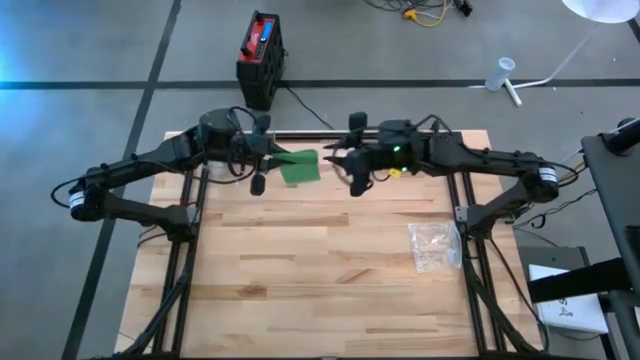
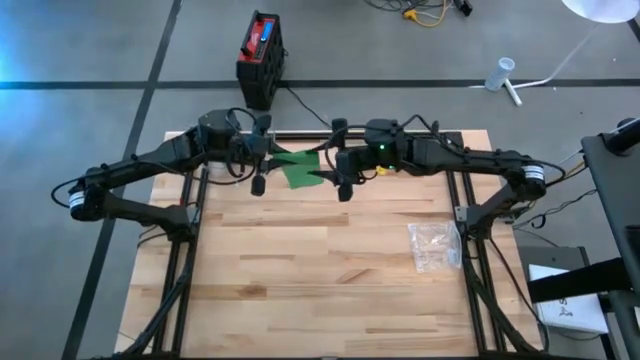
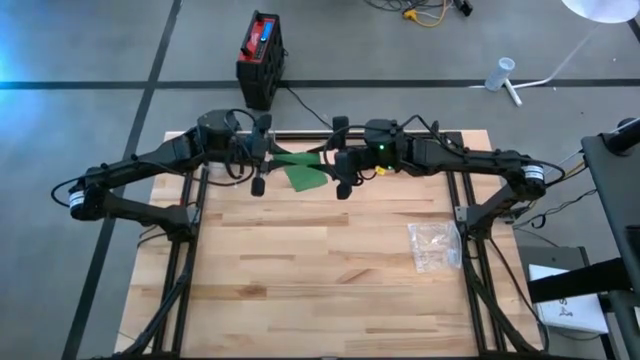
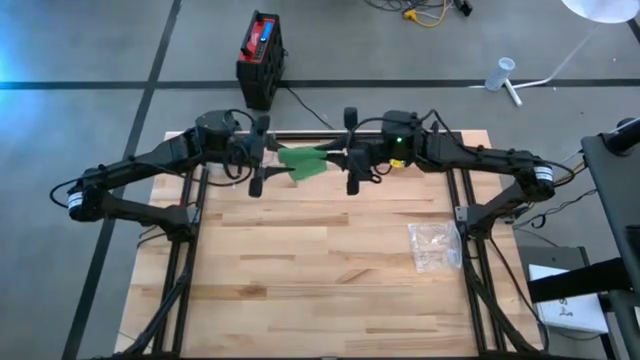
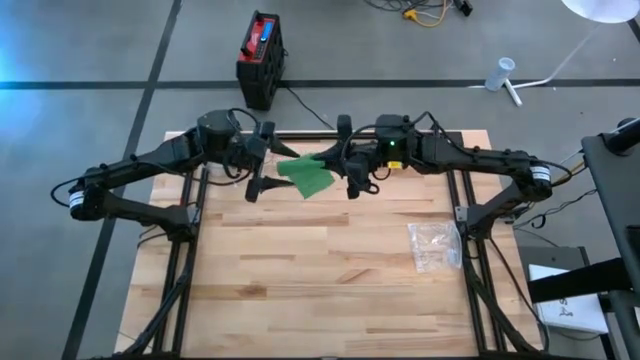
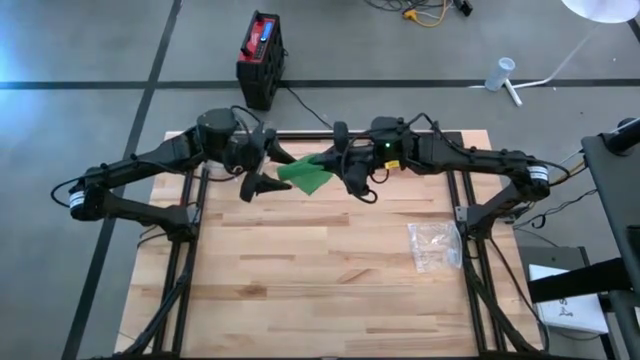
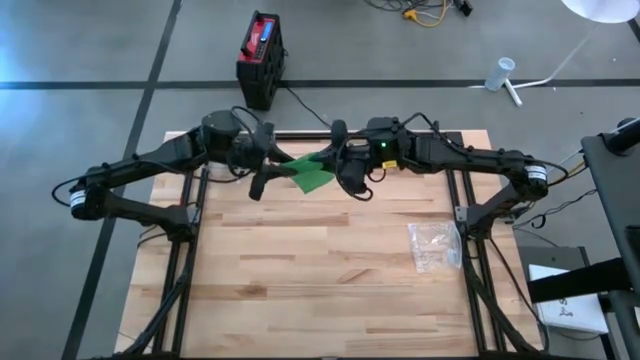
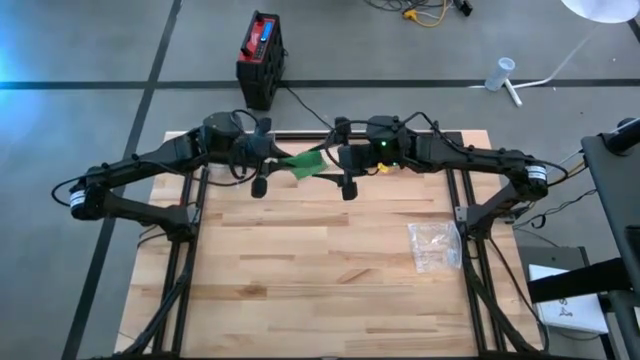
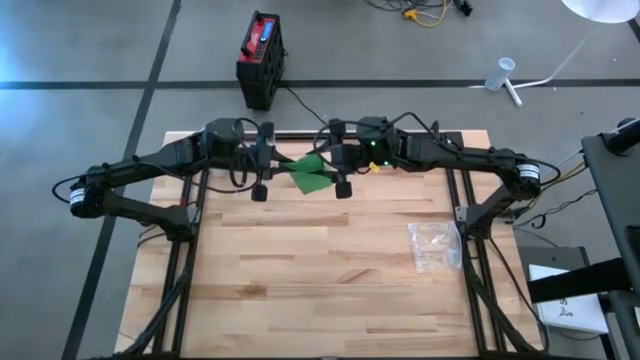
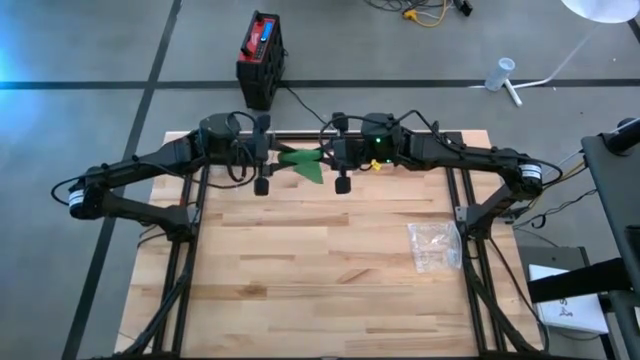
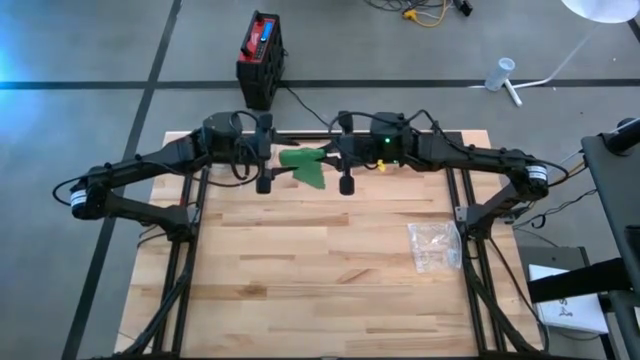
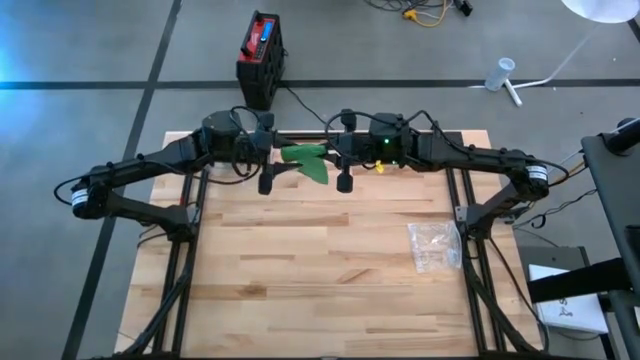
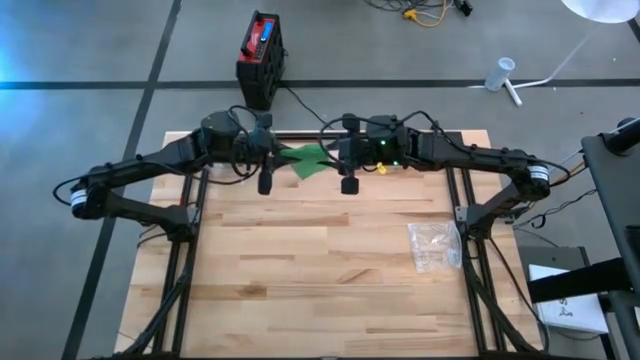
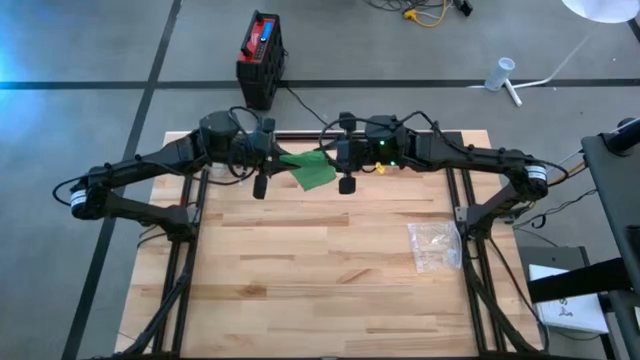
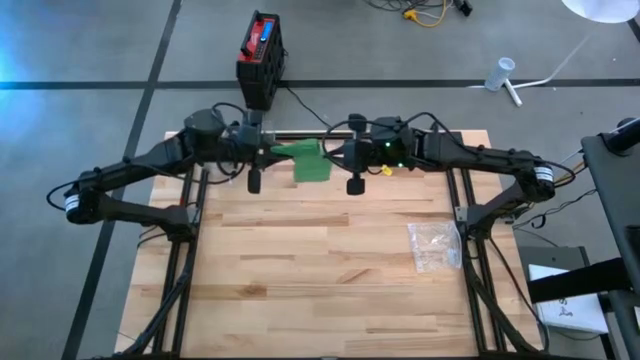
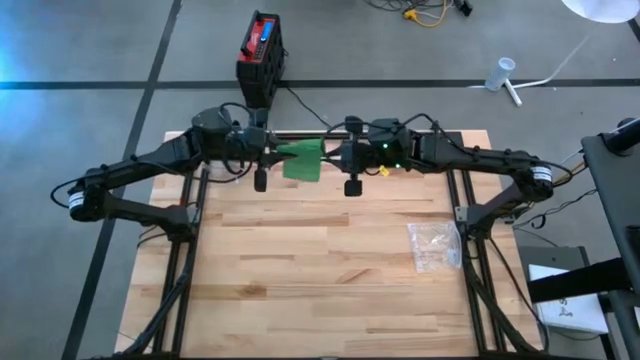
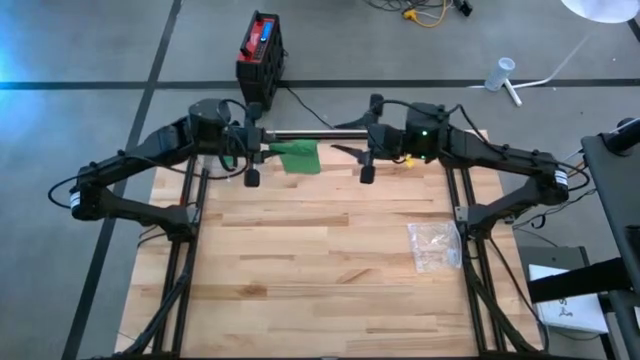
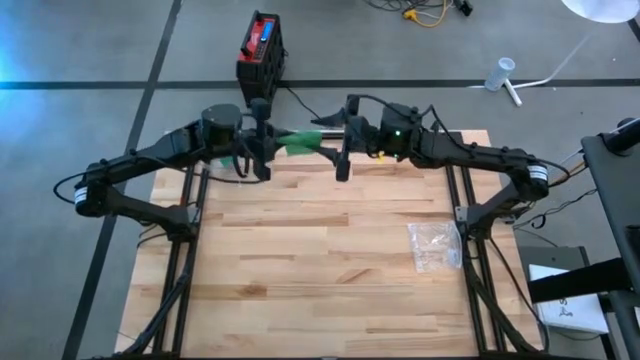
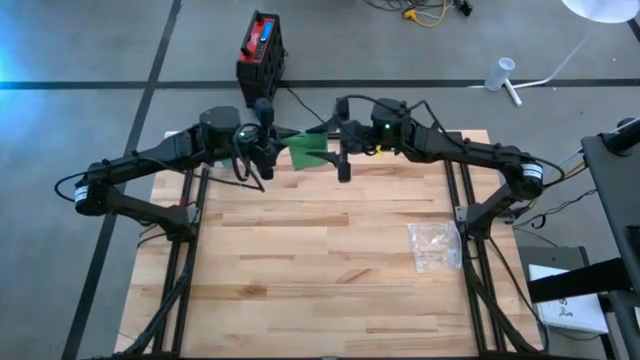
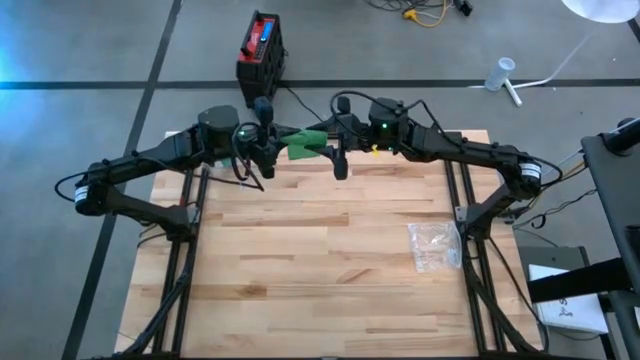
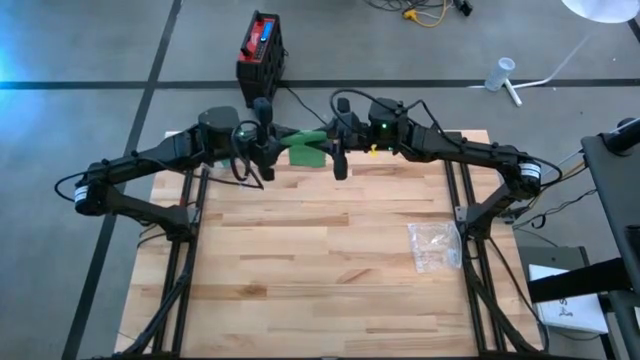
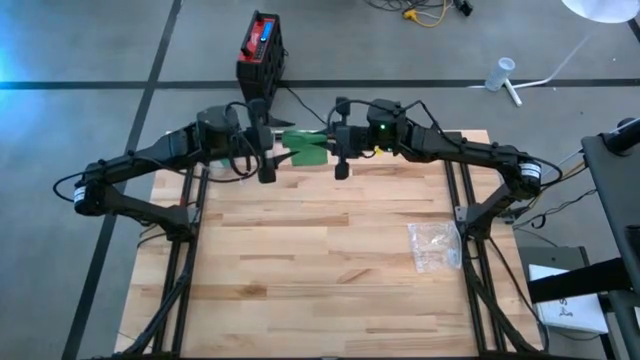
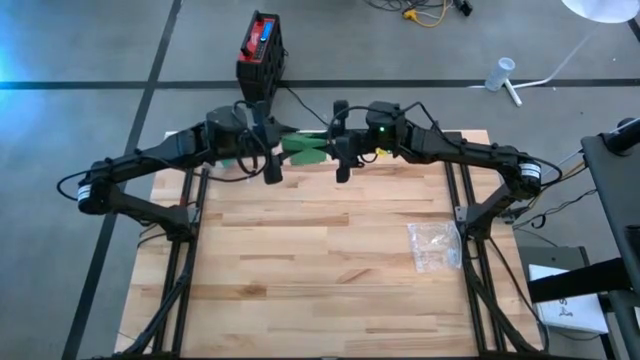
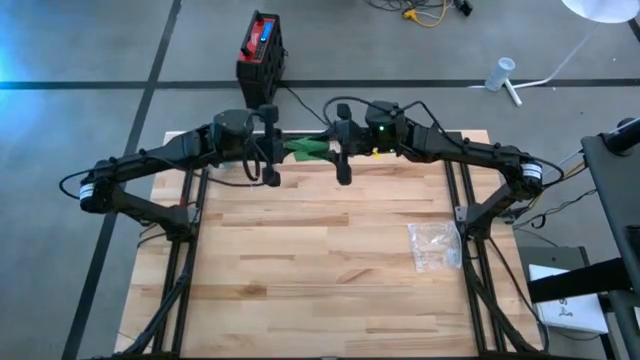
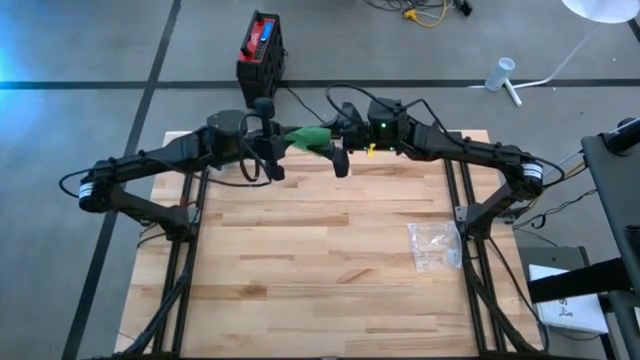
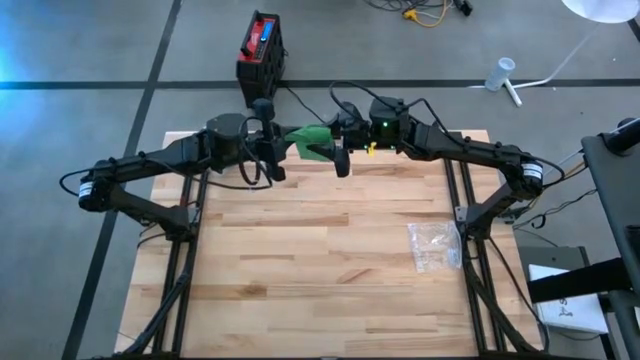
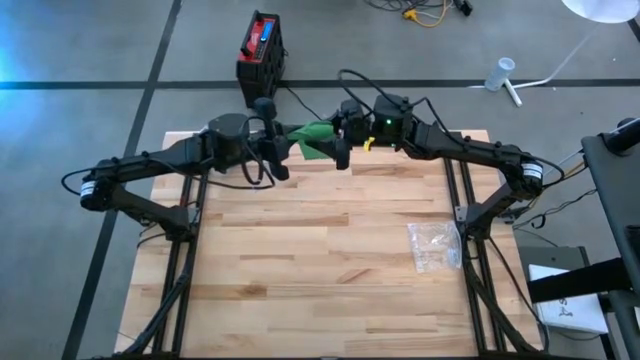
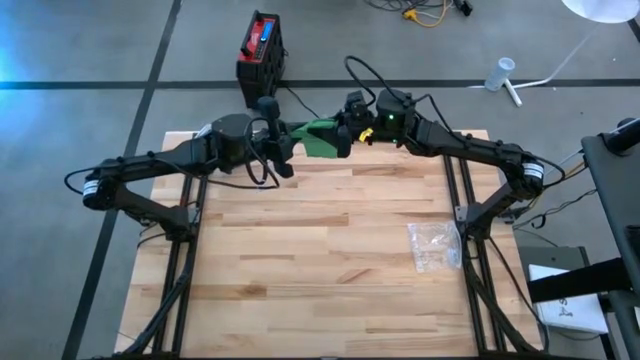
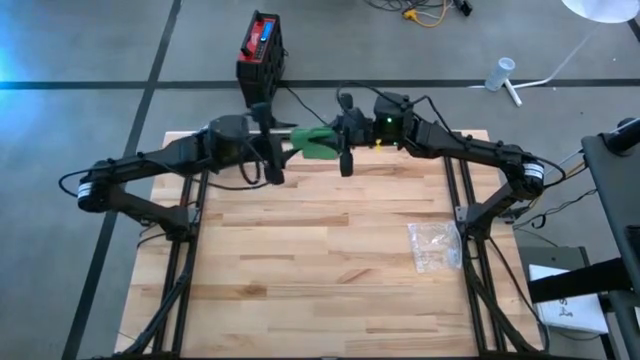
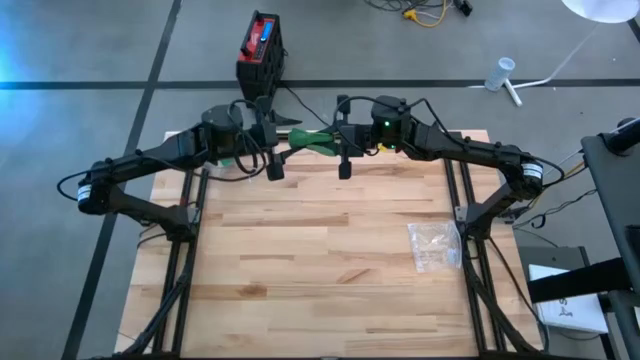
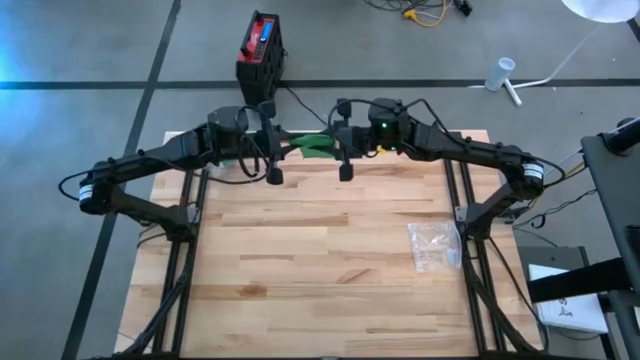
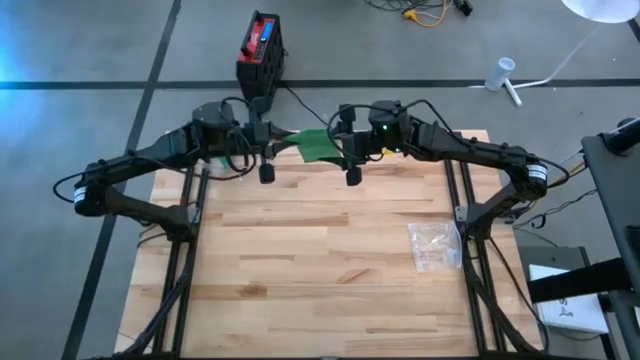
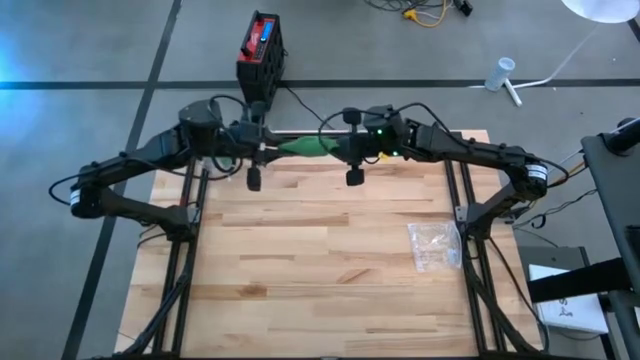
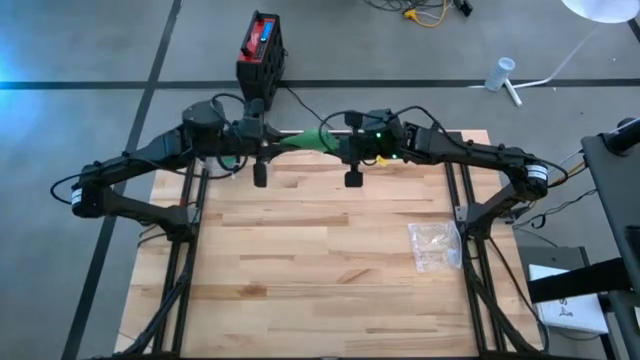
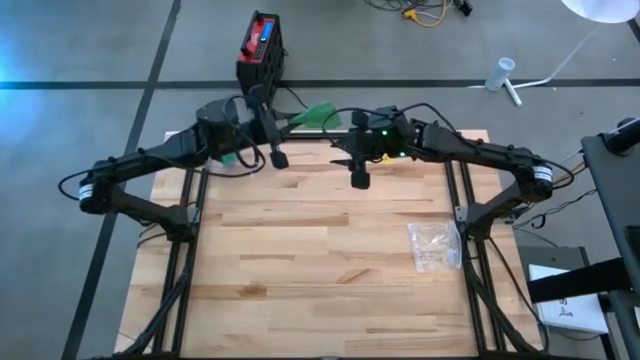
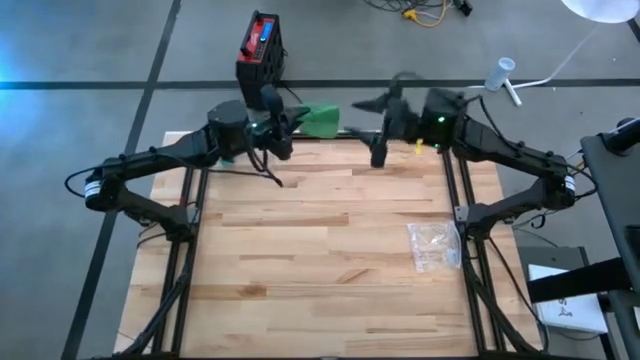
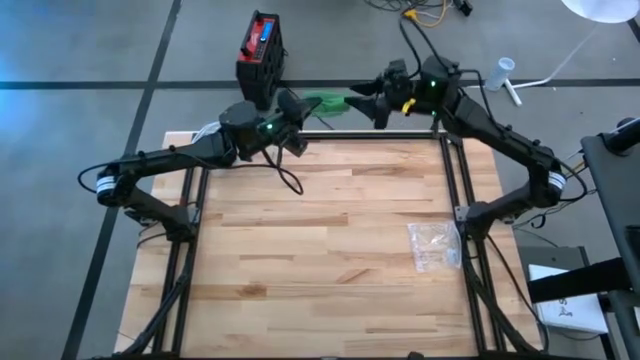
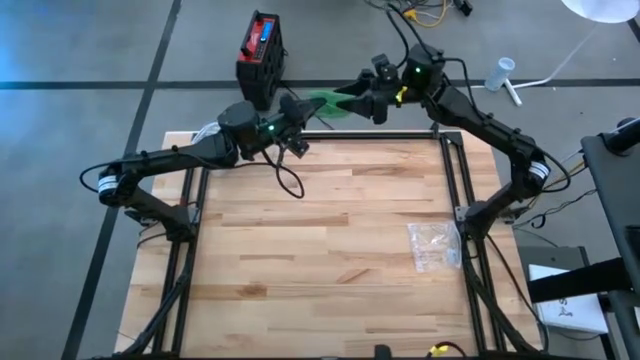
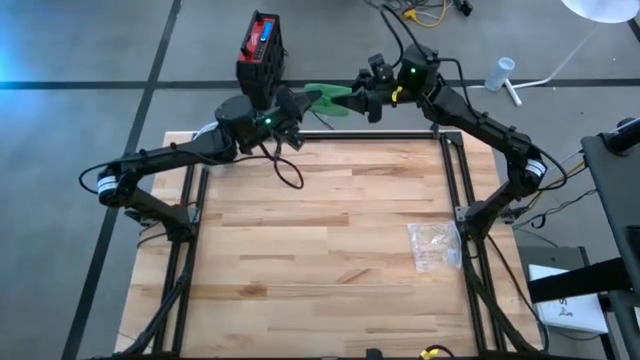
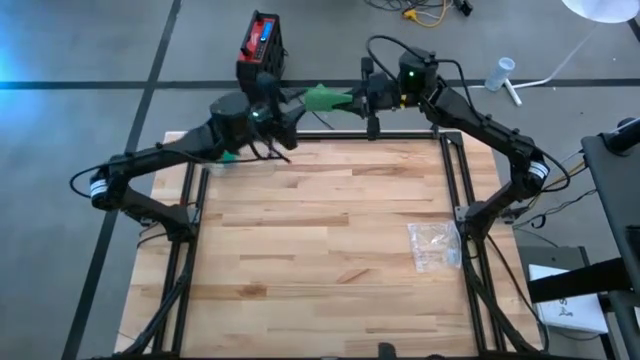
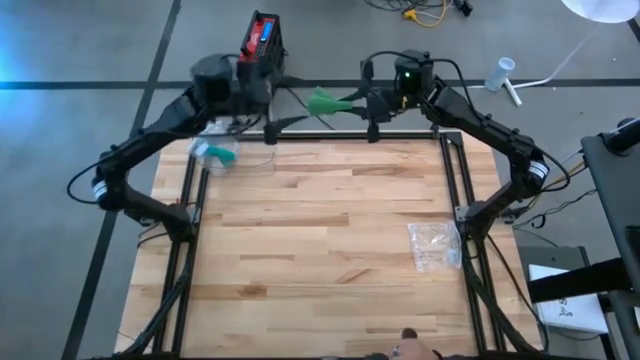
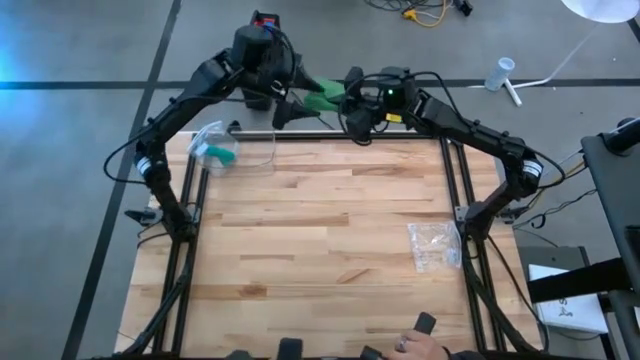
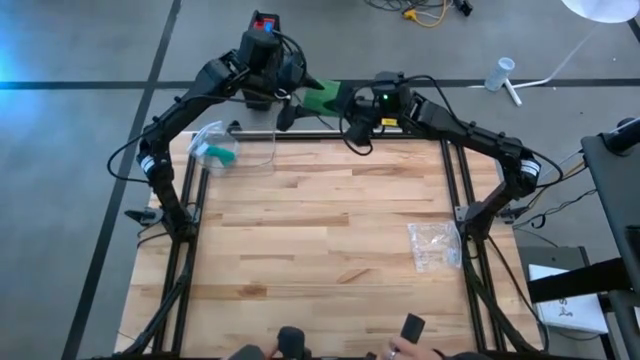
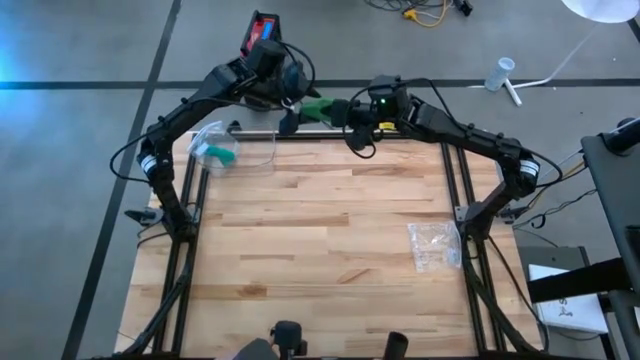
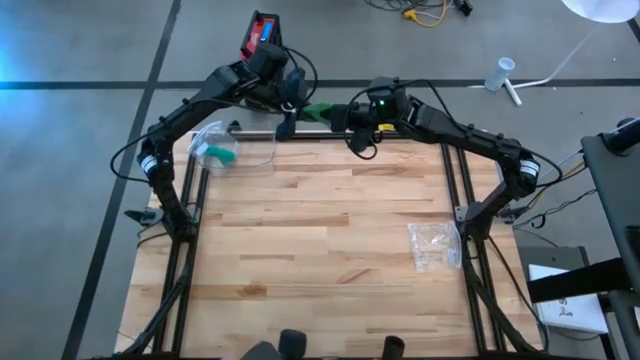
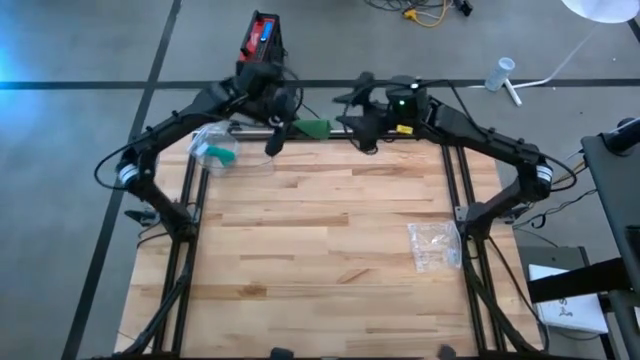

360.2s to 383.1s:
Task: Roll bandage
Roll the green bandage
